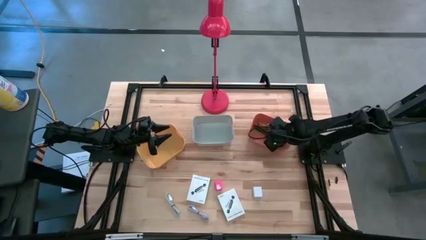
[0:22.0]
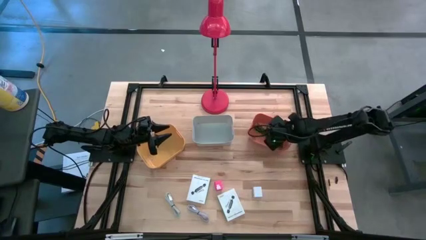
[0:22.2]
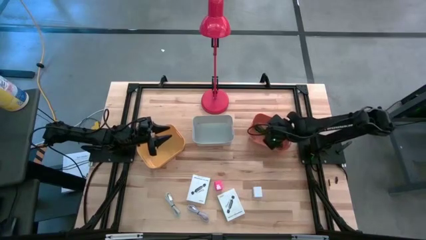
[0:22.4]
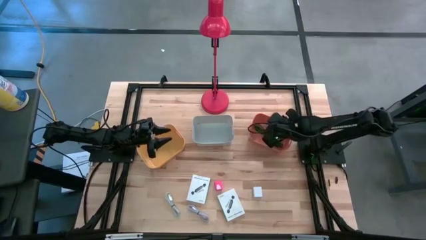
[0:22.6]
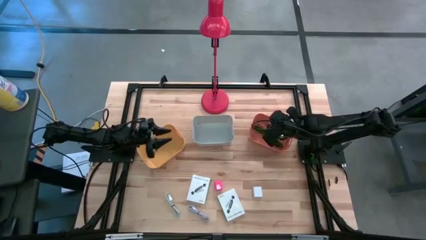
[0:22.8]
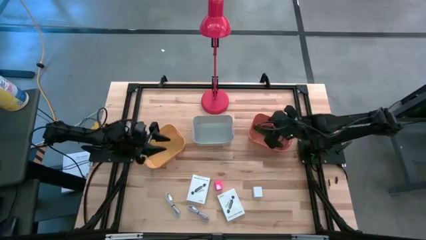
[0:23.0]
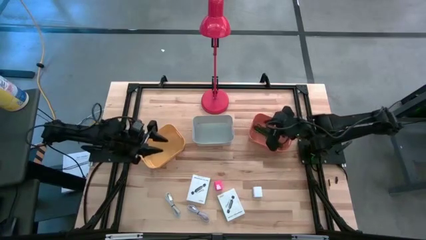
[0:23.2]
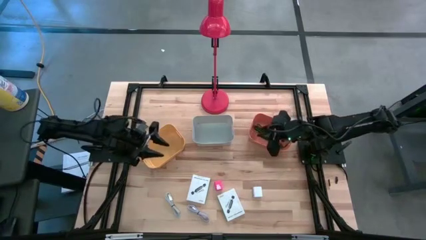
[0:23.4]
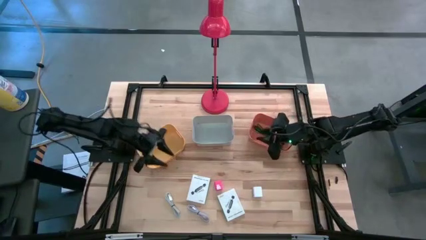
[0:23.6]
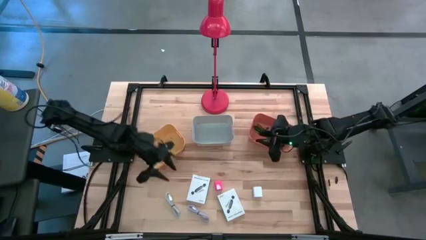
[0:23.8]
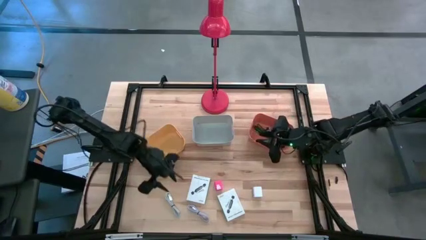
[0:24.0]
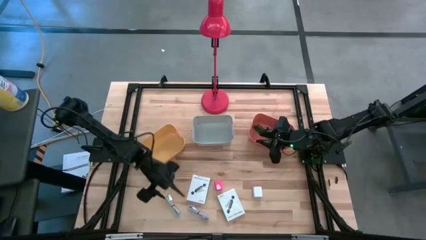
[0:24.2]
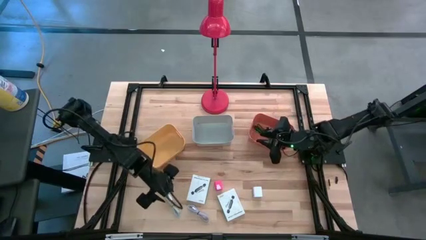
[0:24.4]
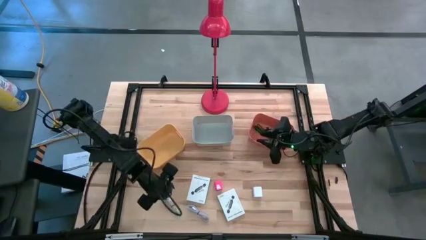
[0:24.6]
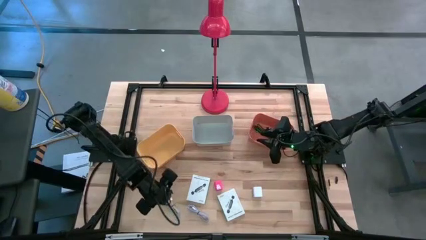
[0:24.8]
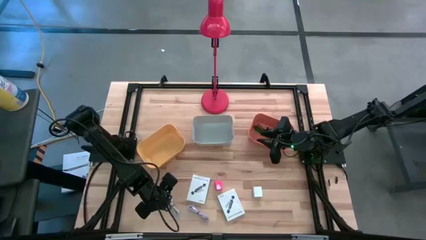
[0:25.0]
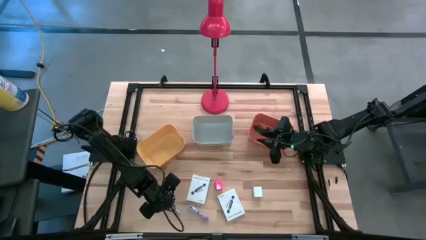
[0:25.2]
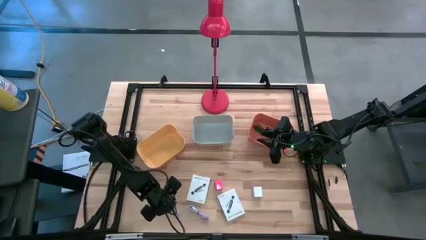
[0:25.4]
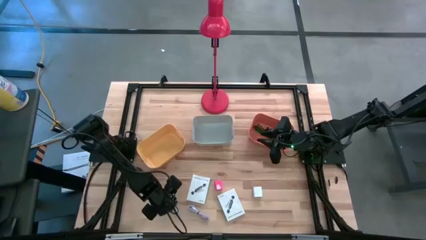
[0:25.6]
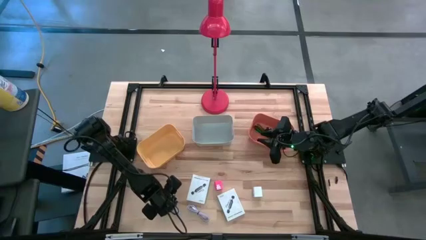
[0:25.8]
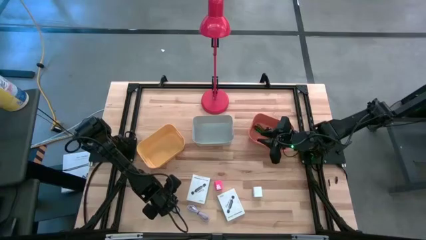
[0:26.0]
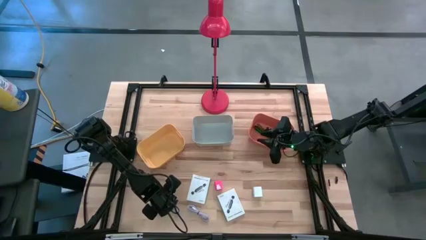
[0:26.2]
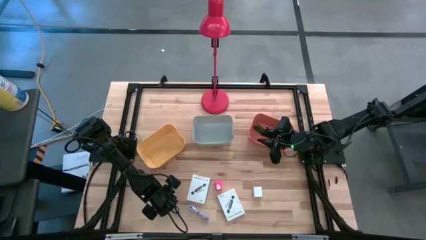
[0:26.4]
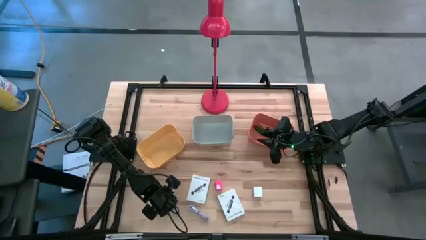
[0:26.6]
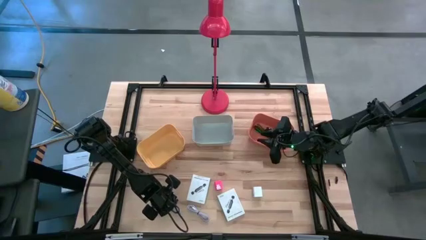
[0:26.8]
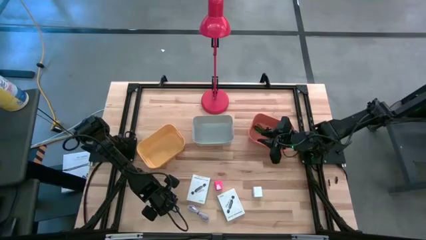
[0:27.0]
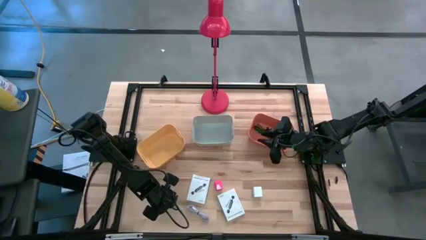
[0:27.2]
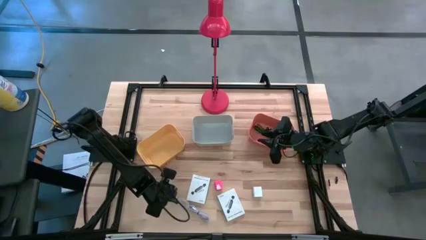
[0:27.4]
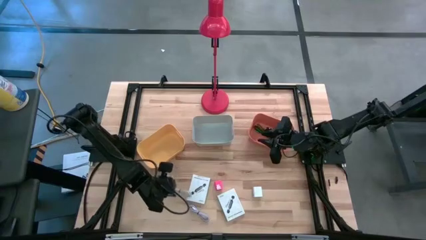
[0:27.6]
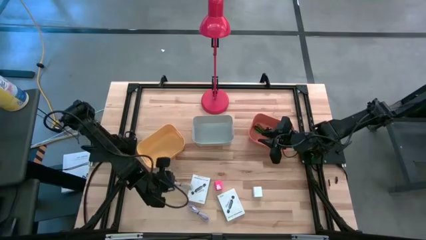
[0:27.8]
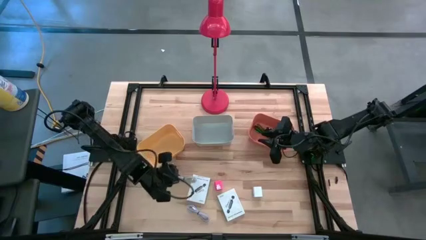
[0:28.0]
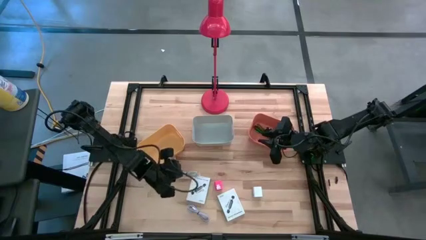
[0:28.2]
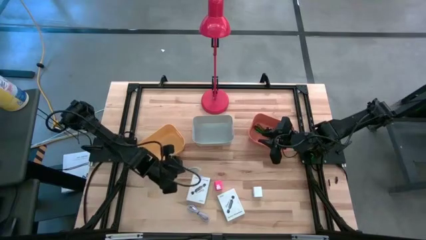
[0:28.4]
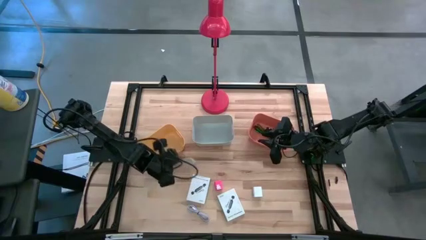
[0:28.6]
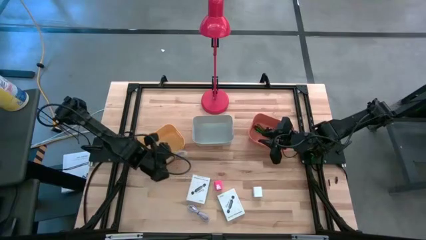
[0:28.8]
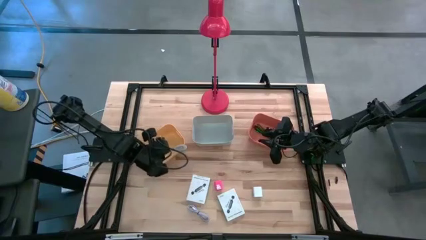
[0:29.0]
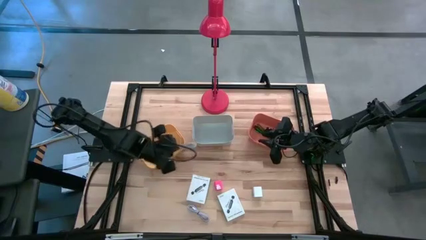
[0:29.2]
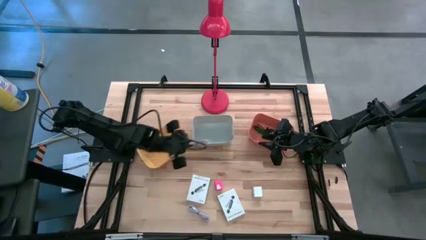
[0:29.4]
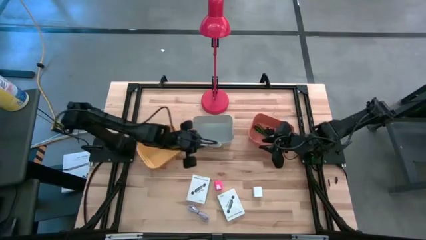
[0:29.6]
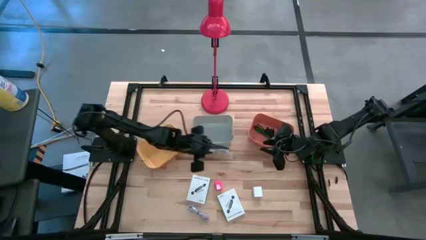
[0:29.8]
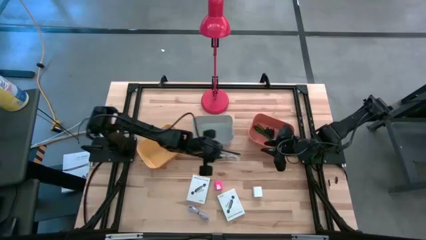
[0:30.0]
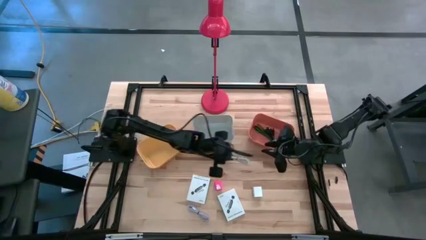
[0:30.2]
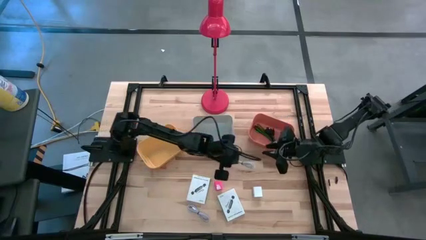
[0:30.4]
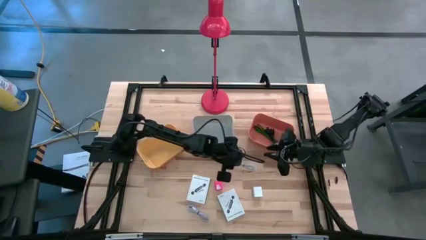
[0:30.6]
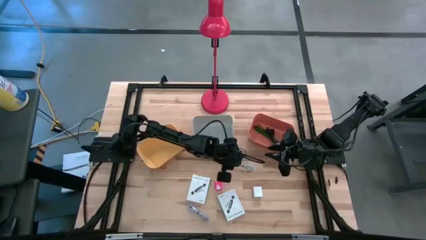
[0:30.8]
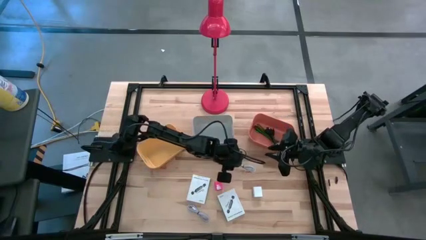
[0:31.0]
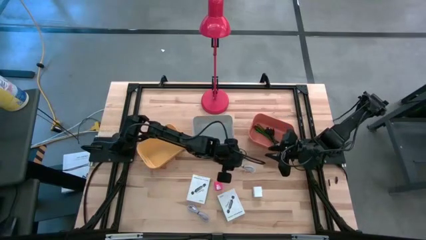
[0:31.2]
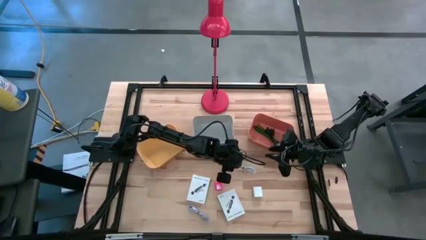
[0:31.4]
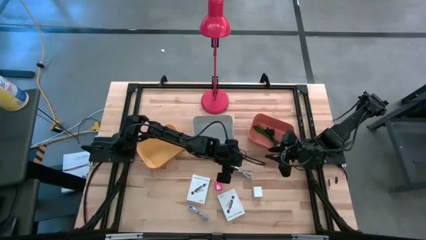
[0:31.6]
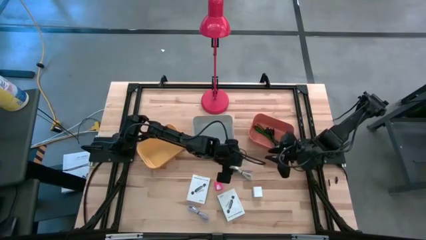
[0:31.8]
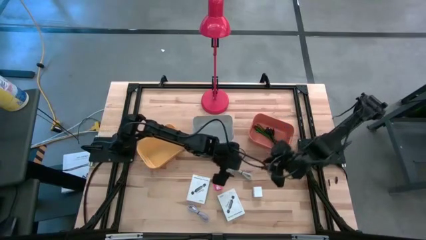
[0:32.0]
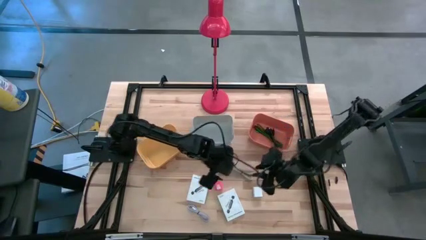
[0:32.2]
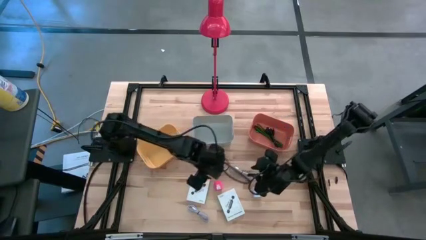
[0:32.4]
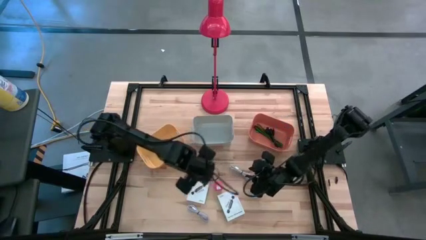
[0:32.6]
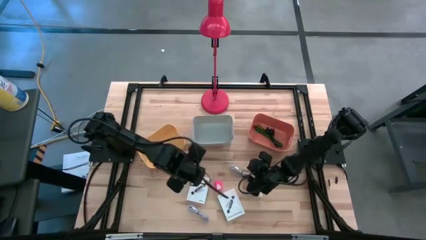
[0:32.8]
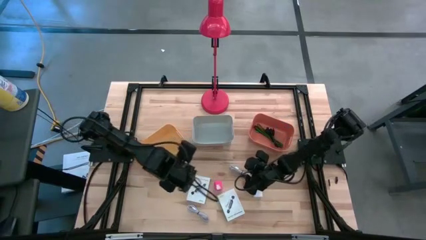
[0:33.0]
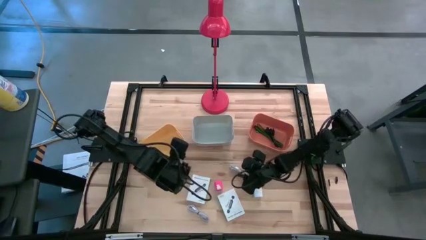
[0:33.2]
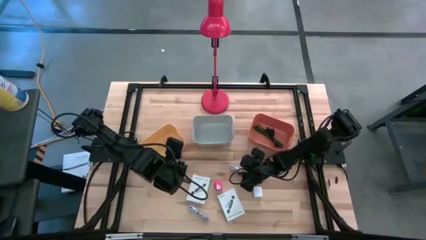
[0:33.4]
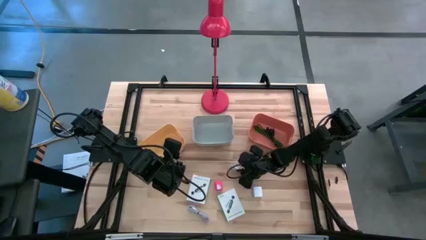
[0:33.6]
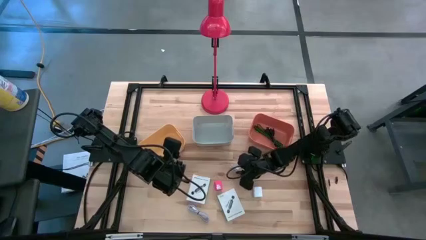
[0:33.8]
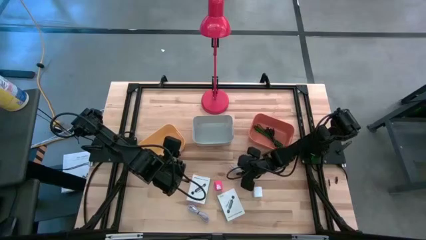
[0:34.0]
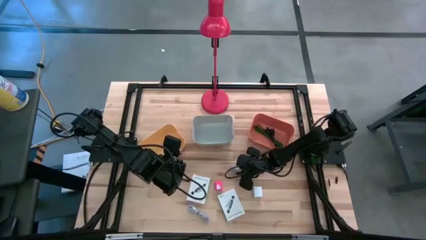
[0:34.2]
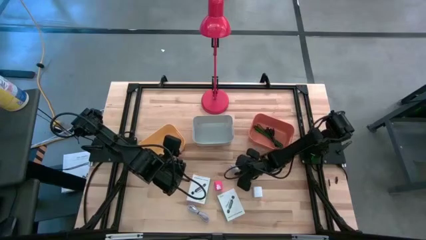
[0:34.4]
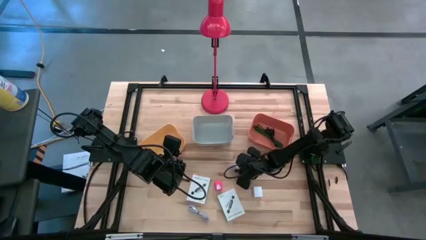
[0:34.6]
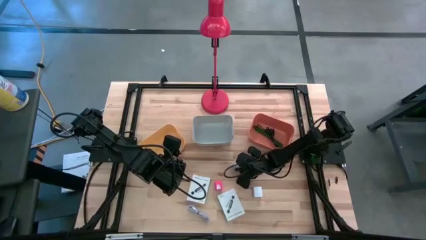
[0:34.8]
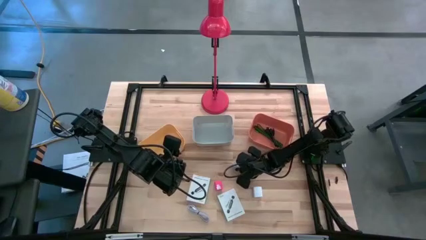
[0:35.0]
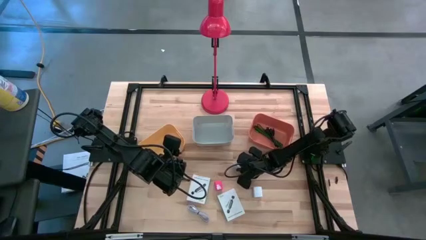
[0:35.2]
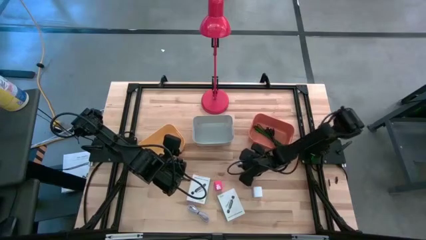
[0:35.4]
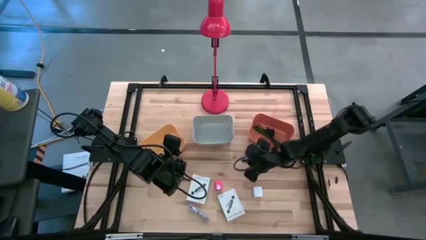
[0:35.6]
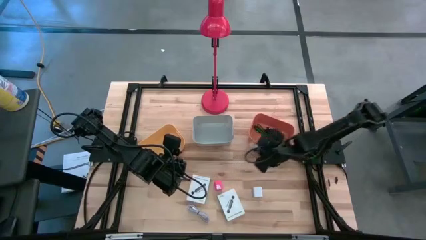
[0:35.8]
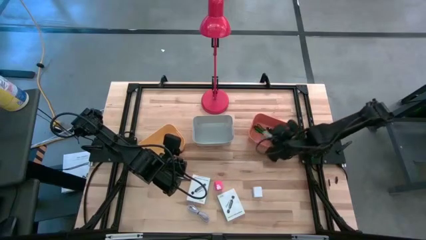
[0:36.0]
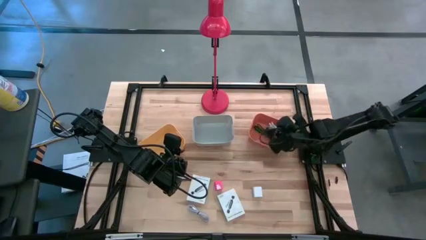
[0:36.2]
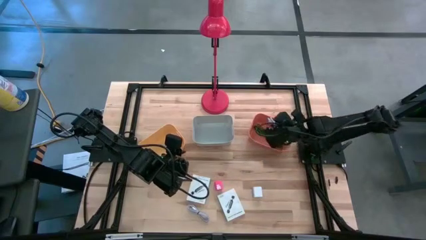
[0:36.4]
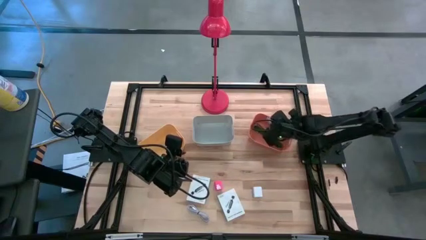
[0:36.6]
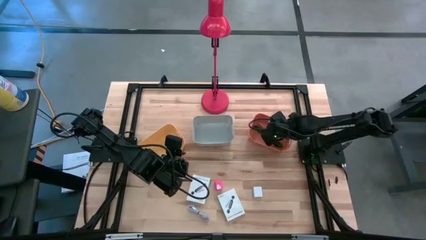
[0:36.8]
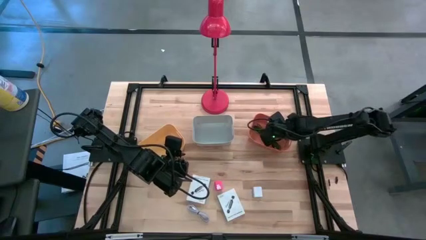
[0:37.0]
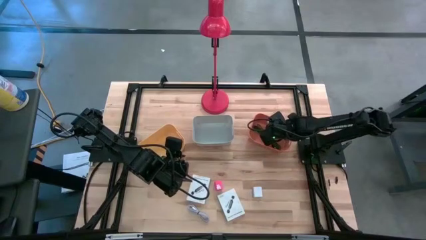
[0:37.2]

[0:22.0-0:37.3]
Task: Pick and place items into bin
Put the white charger cable into the orange bin
